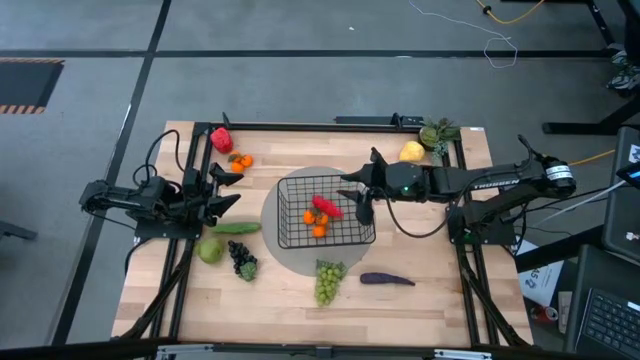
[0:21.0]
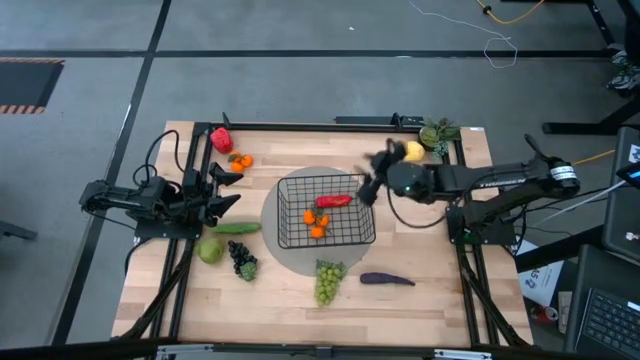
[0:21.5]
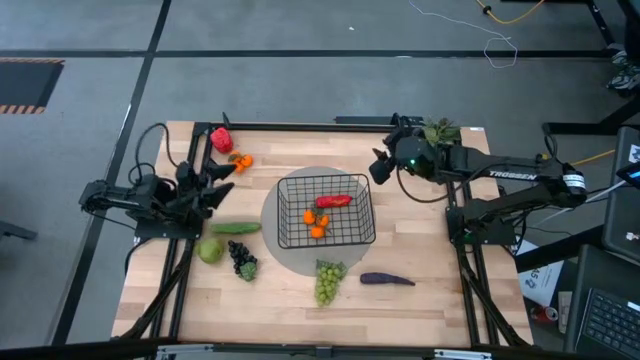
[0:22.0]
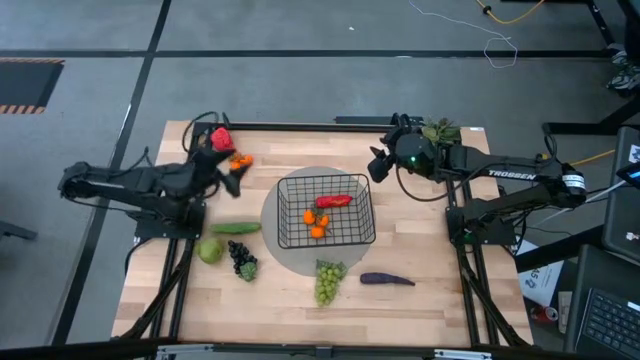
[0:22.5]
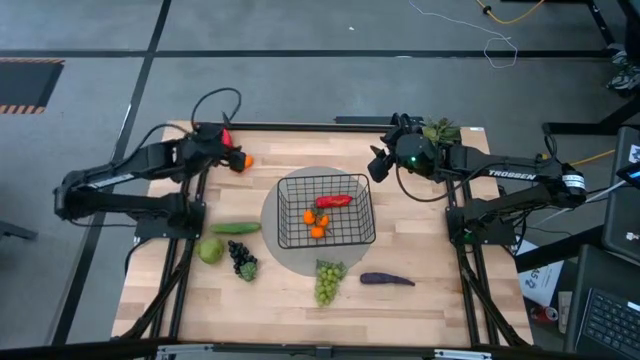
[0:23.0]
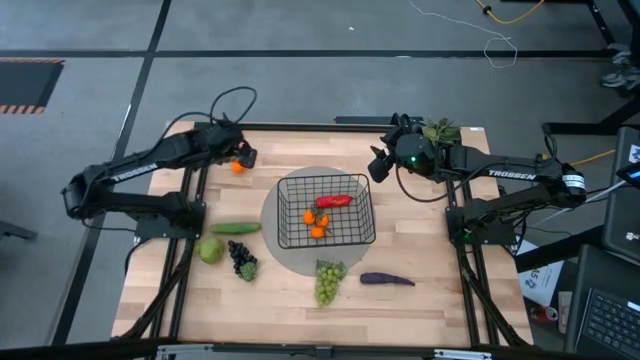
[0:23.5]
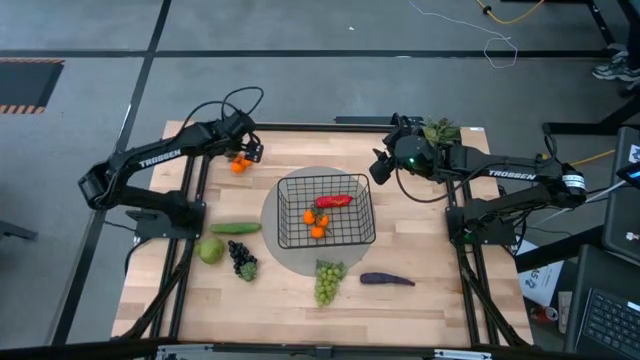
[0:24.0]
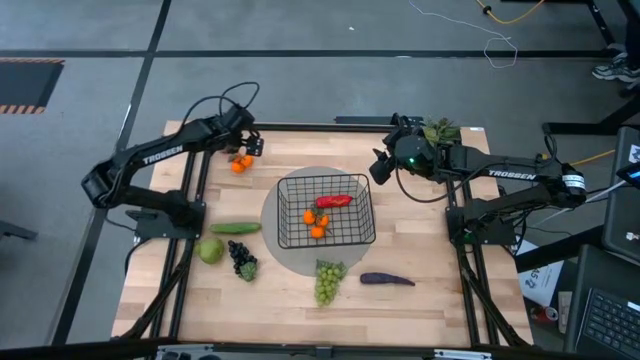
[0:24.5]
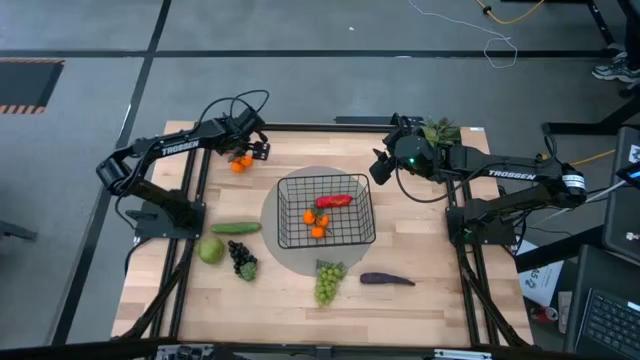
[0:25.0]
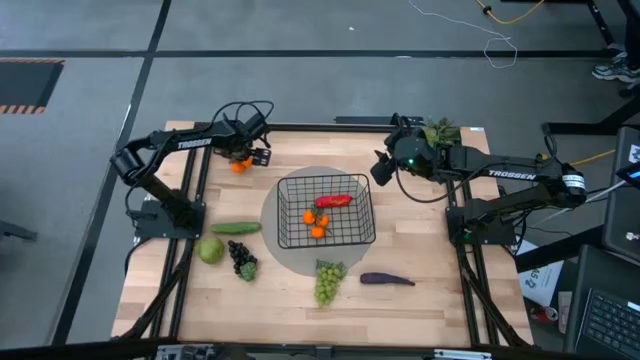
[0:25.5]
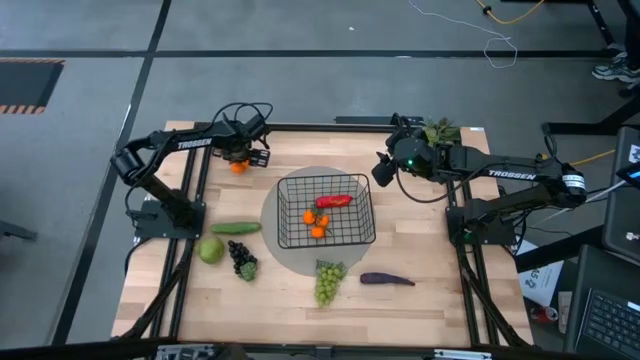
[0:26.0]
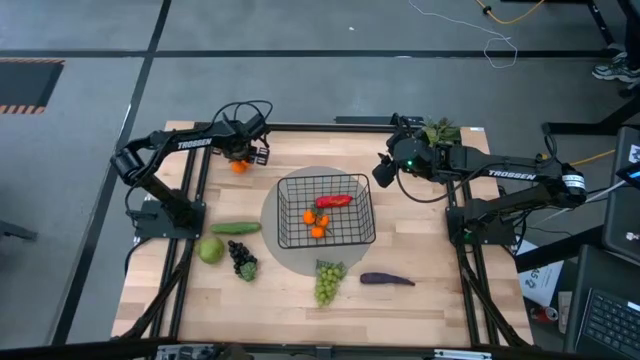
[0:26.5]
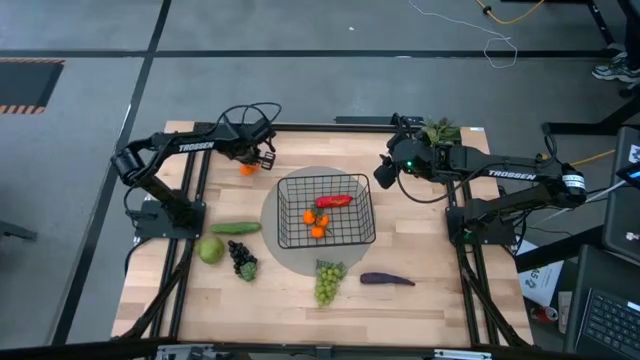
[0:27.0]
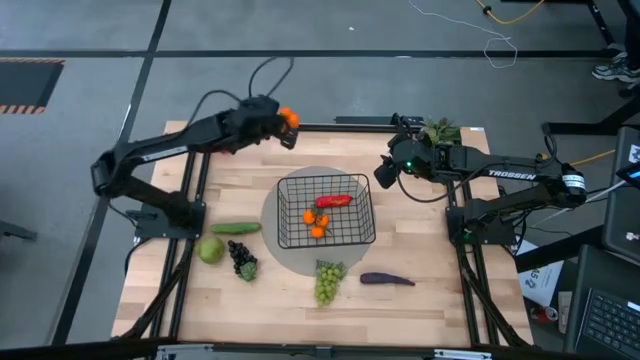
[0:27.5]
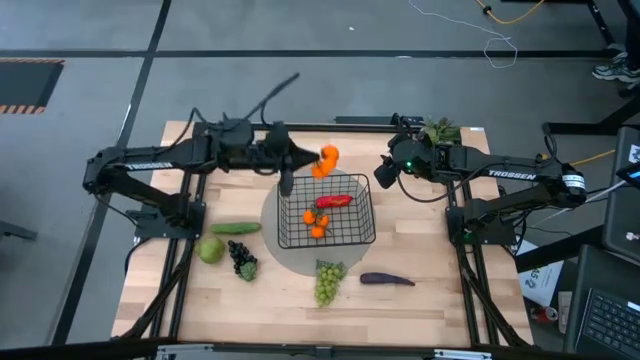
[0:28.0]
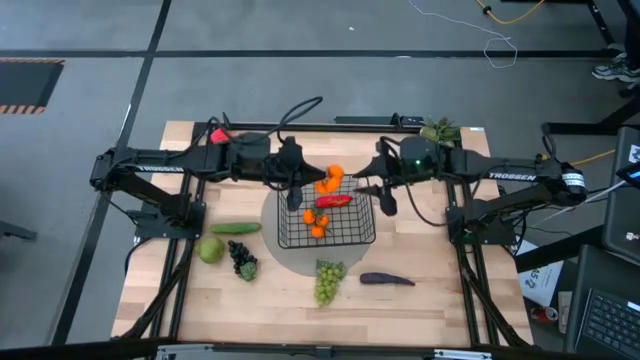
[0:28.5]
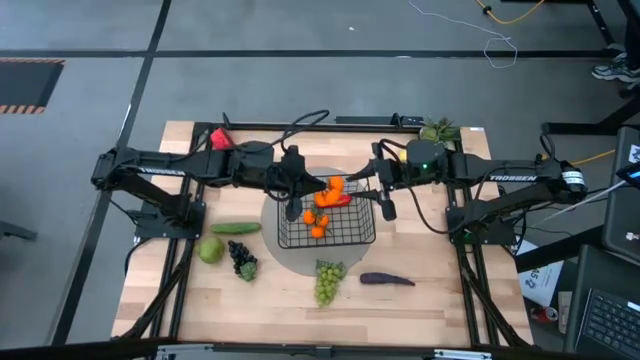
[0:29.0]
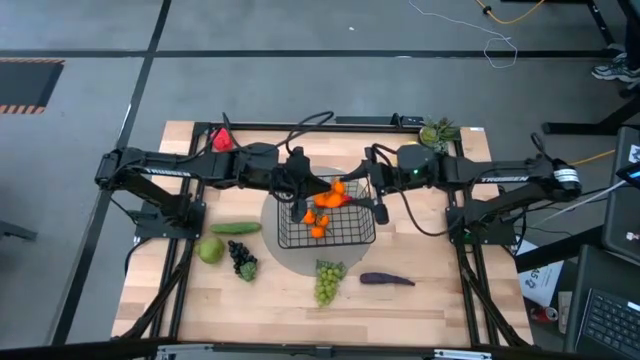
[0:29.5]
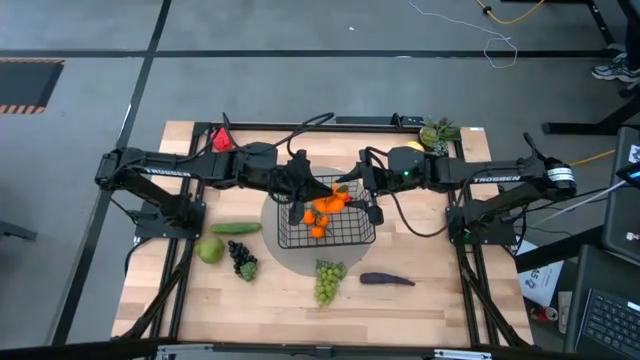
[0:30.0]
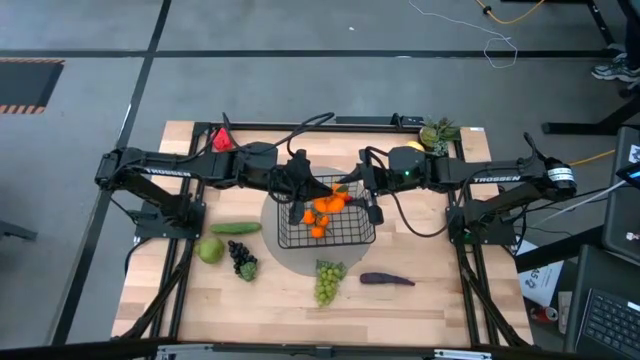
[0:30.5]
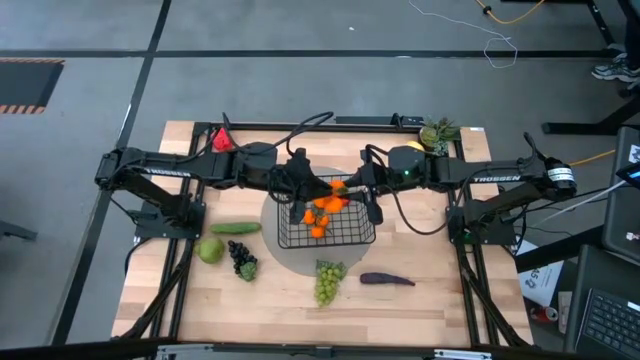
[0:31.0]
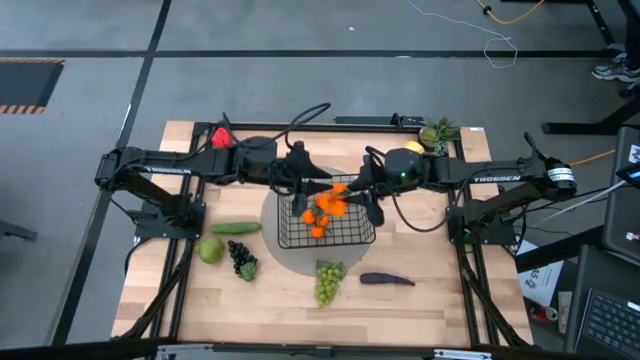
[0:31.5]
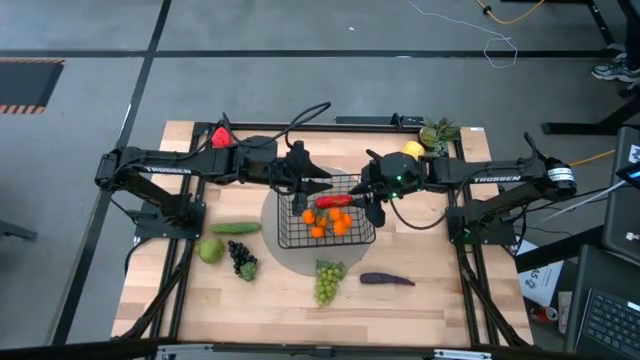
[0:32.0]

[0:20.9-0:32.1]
Task: Build produce basket
Put the orange tangerine into the wire basket

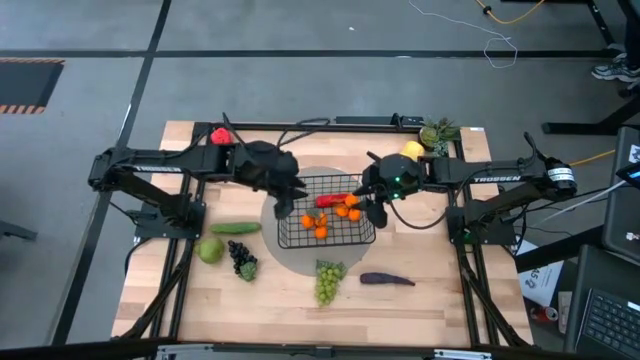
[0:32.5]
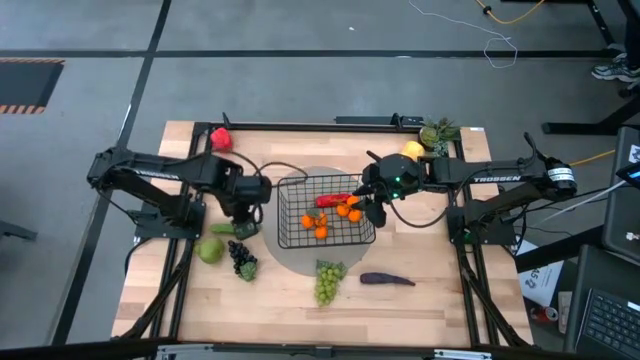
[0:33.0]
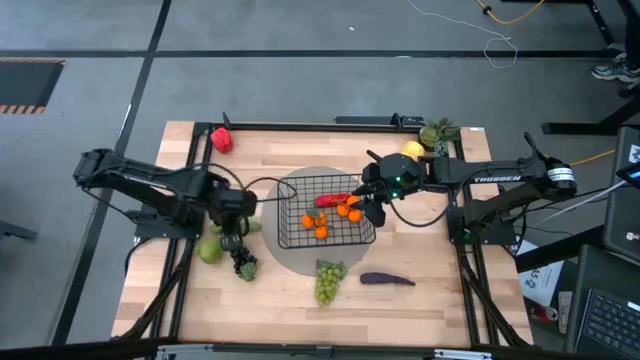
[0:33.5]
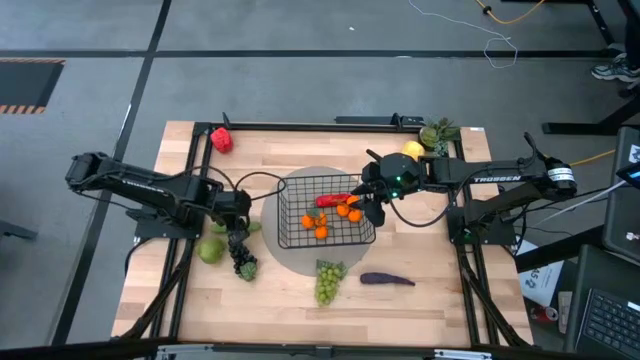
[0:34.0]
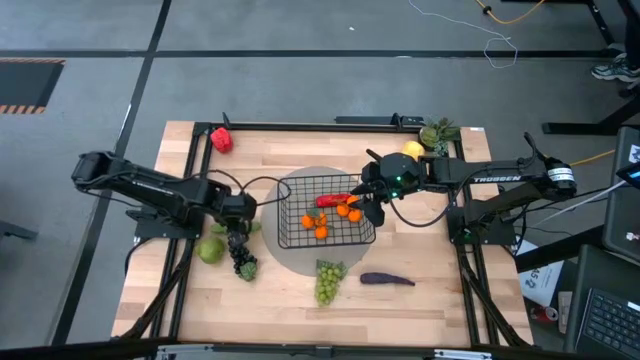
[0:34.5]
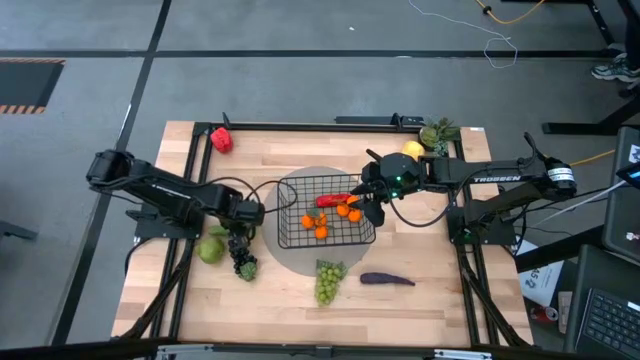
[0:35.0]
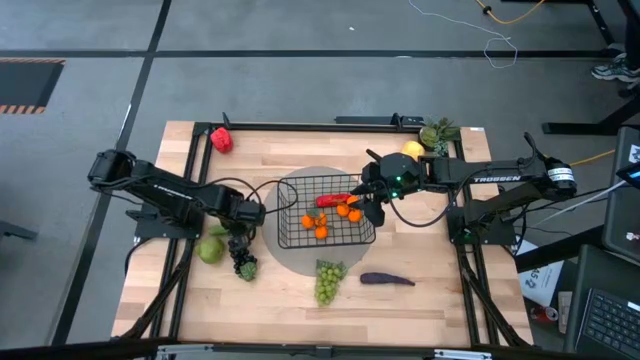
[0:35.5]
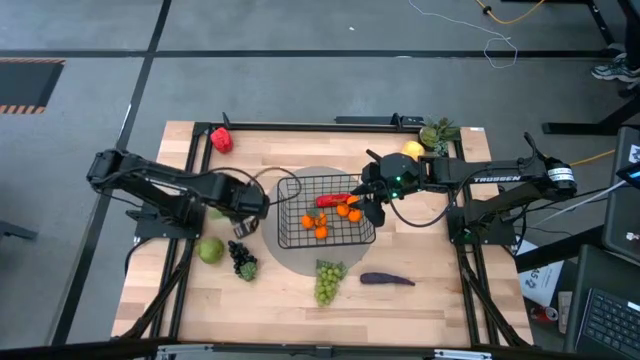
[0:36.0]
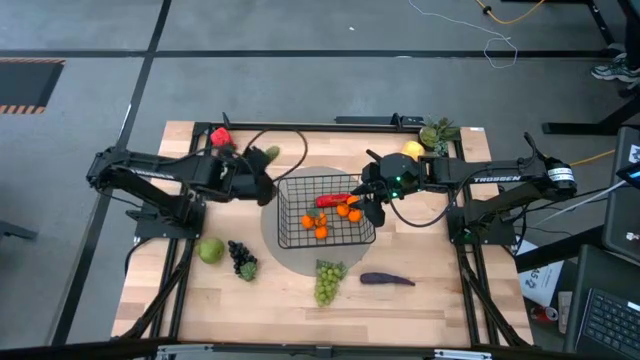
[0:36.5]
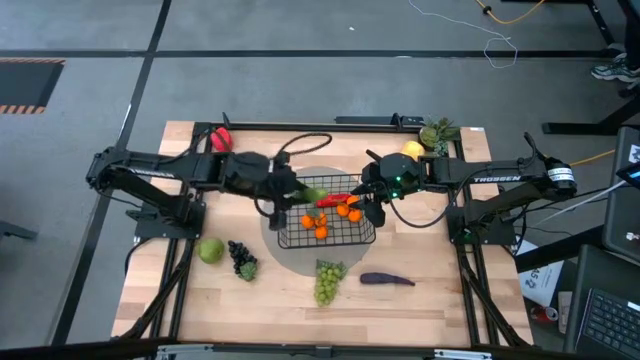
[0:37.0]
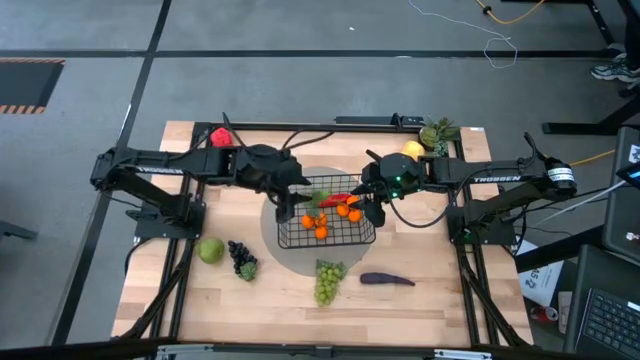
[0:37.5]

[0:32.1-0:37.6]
Put the green cucumber into the wire basket

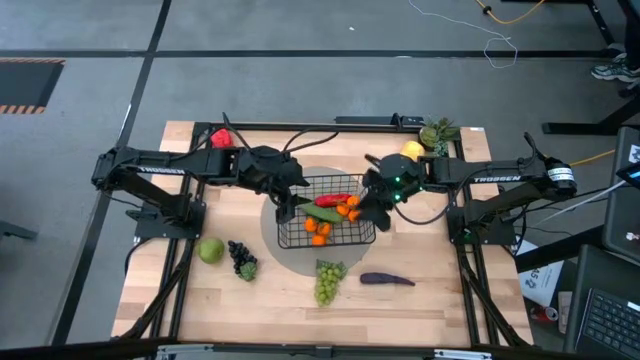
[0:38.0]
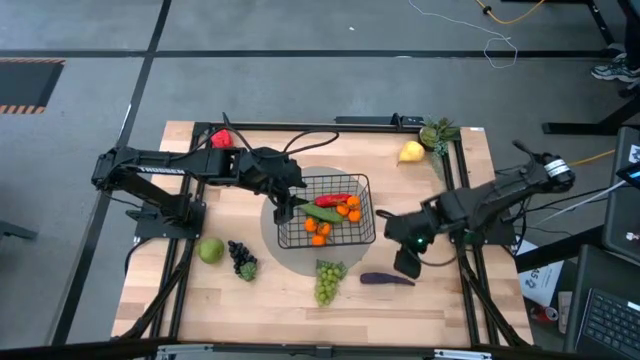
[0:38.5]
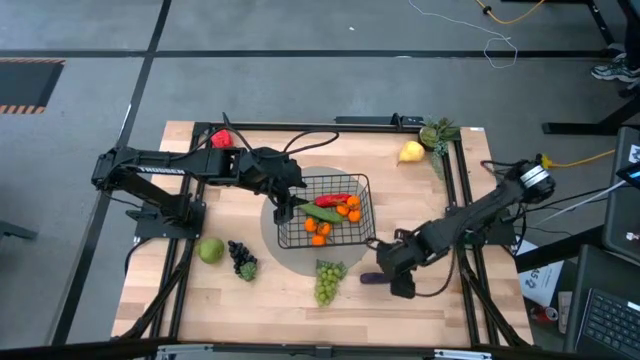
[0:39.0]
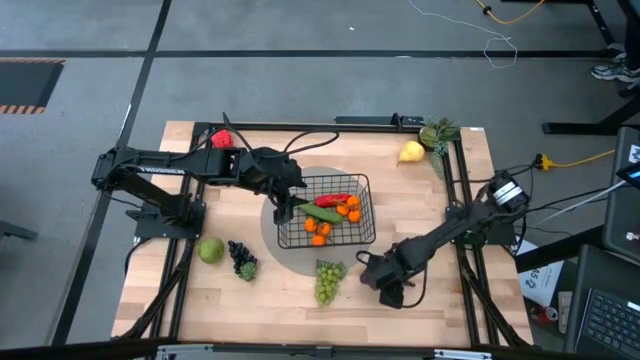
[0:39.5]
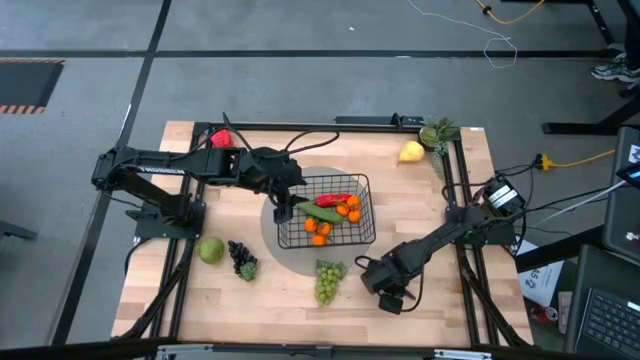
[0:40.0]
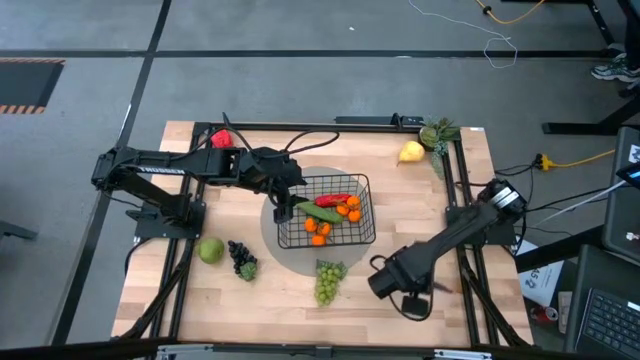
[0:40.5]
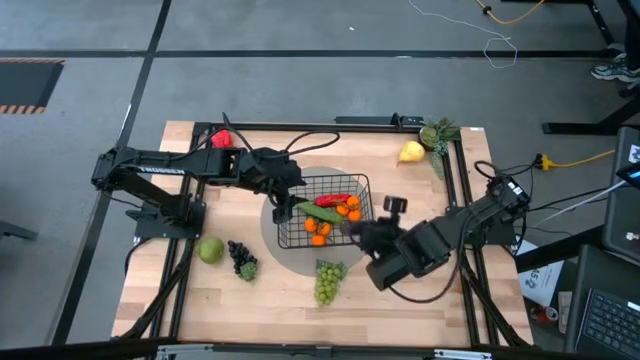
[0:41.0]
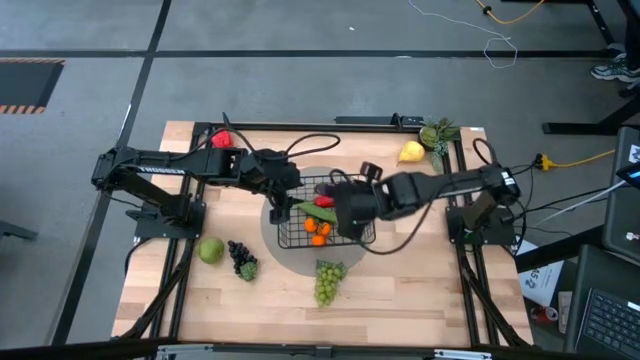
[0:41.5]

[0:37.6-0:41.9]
Put the purple eggplant into the wire basket
